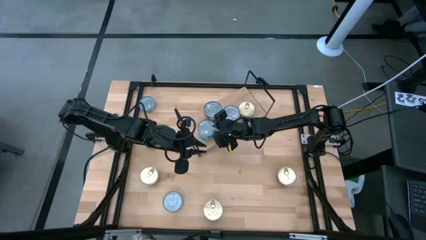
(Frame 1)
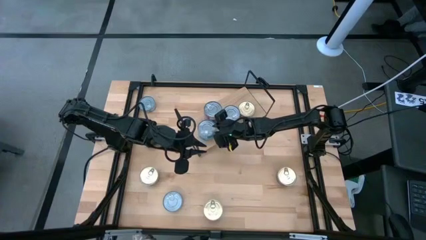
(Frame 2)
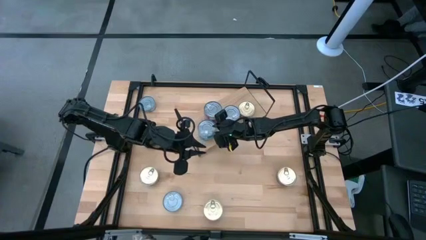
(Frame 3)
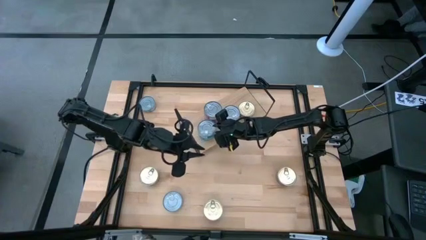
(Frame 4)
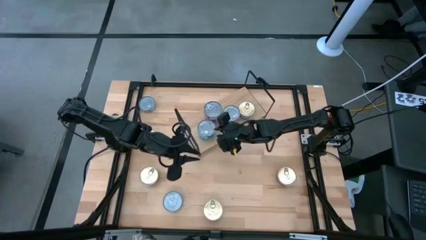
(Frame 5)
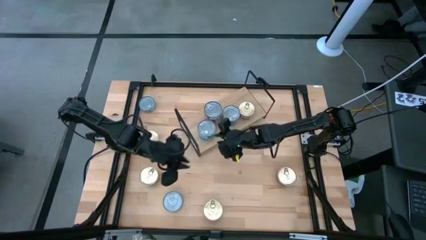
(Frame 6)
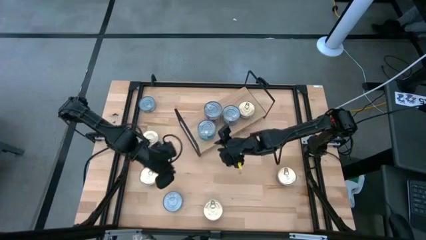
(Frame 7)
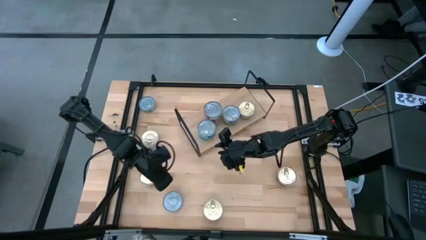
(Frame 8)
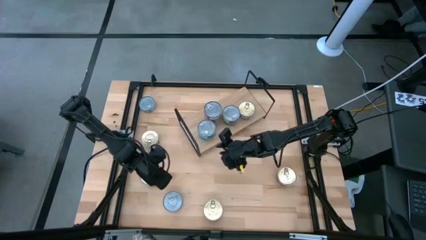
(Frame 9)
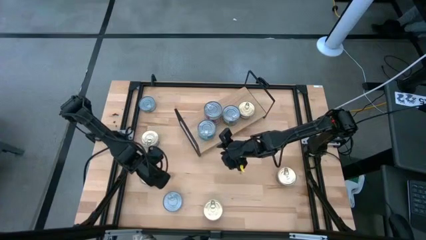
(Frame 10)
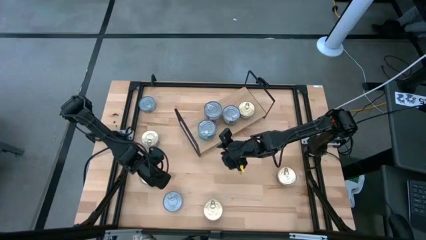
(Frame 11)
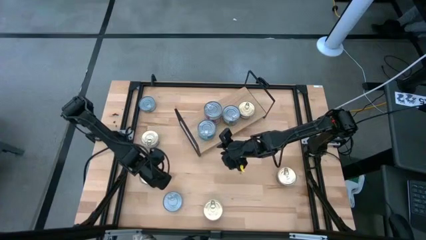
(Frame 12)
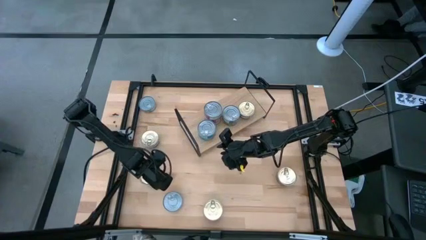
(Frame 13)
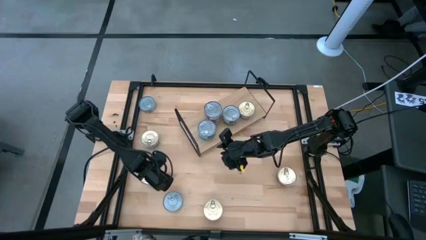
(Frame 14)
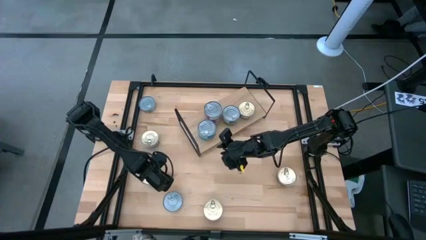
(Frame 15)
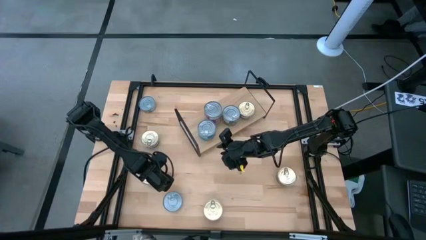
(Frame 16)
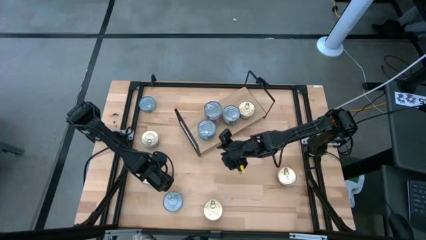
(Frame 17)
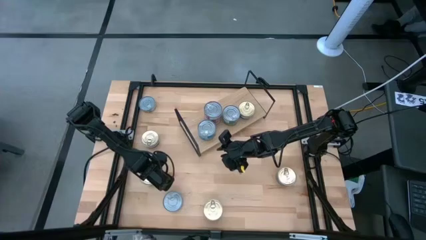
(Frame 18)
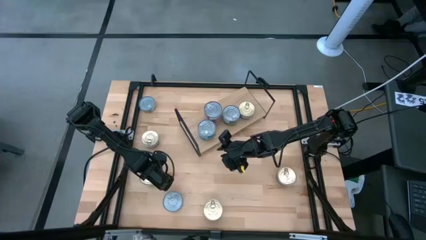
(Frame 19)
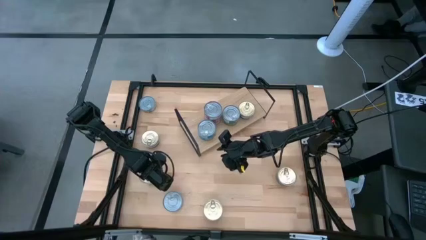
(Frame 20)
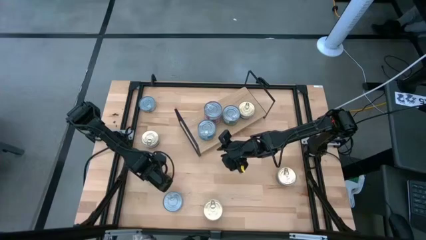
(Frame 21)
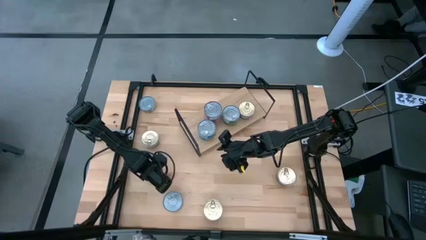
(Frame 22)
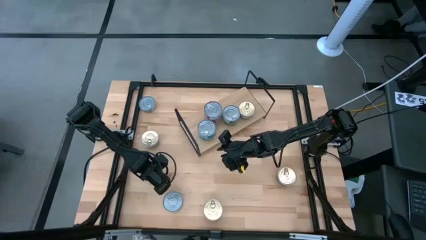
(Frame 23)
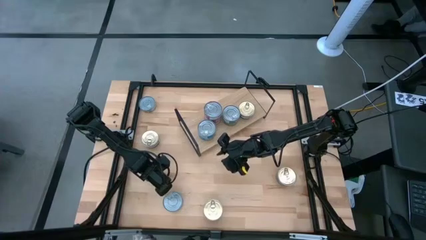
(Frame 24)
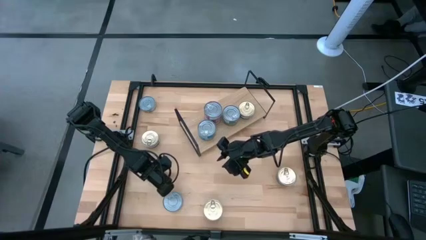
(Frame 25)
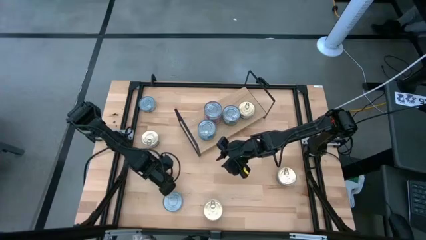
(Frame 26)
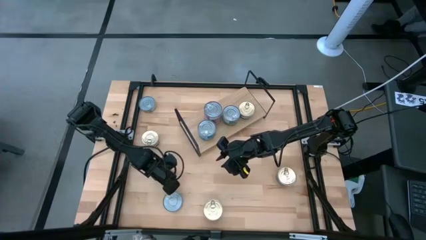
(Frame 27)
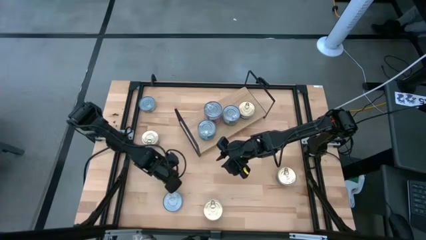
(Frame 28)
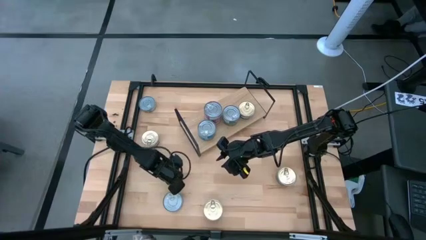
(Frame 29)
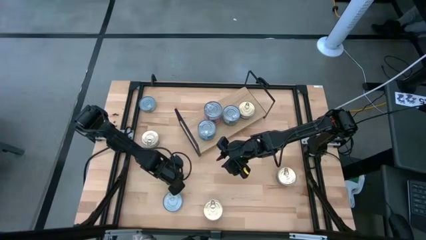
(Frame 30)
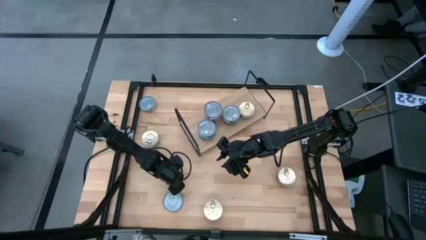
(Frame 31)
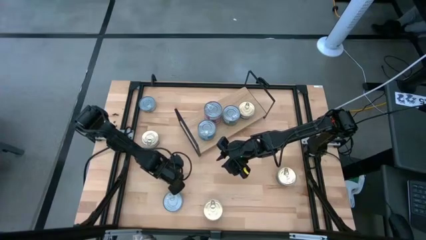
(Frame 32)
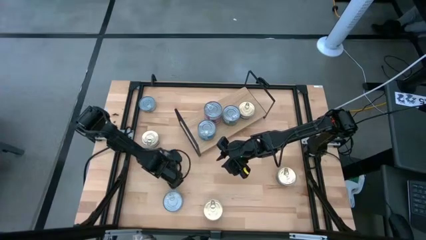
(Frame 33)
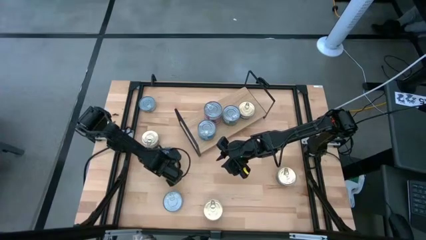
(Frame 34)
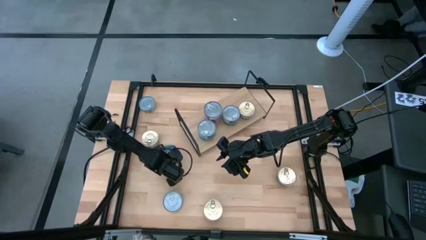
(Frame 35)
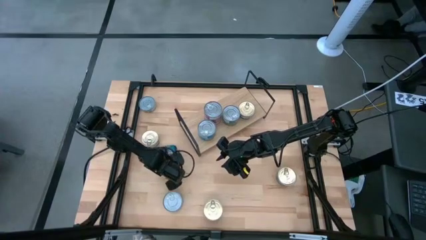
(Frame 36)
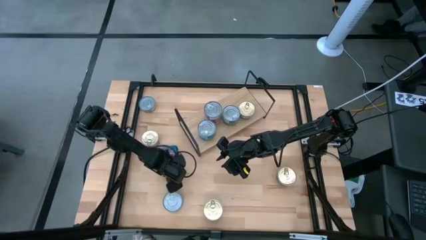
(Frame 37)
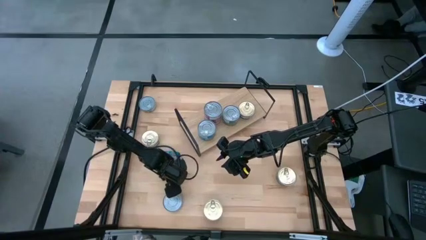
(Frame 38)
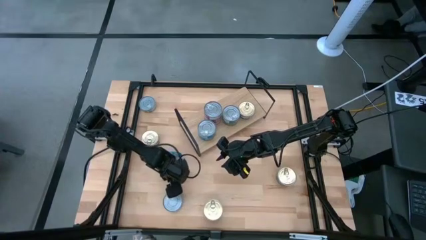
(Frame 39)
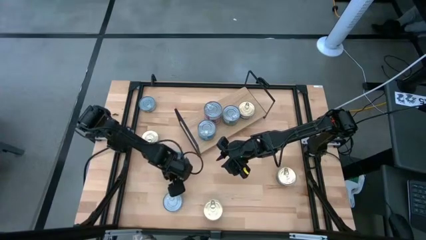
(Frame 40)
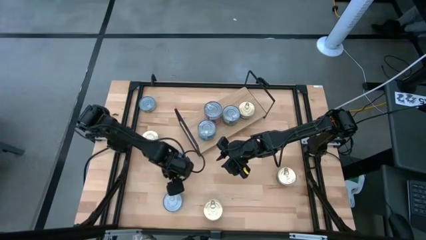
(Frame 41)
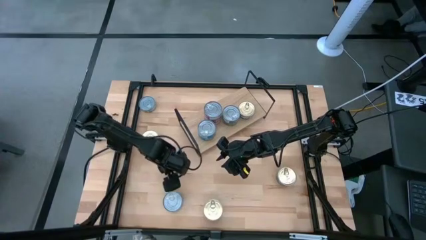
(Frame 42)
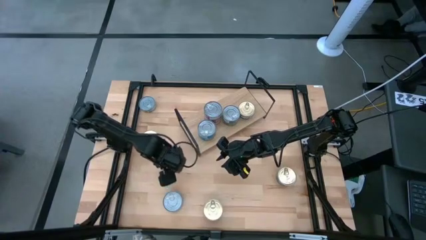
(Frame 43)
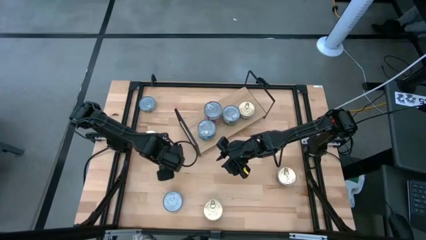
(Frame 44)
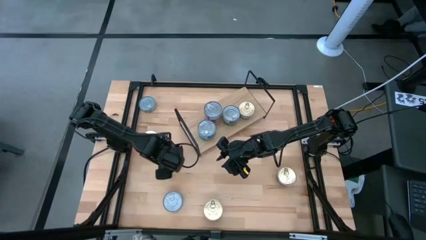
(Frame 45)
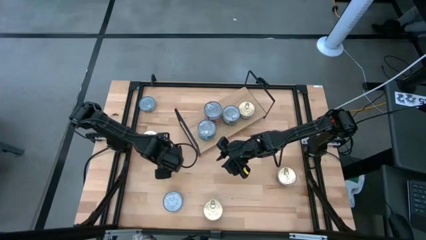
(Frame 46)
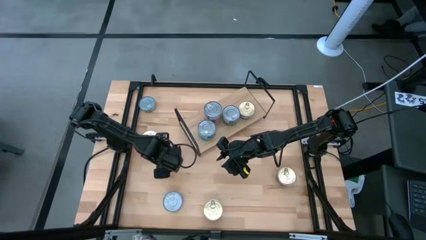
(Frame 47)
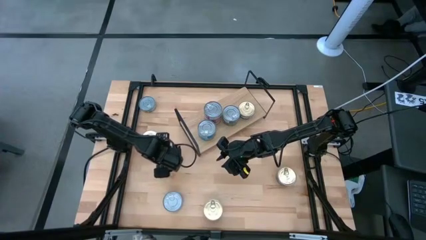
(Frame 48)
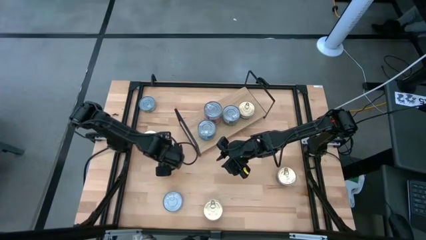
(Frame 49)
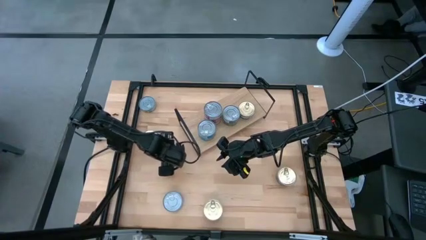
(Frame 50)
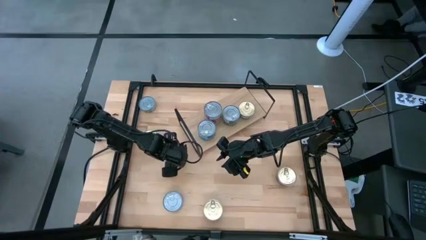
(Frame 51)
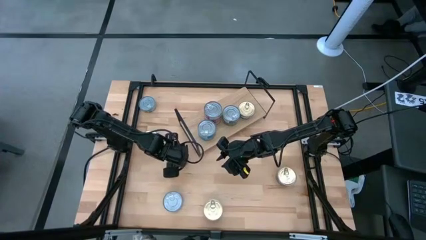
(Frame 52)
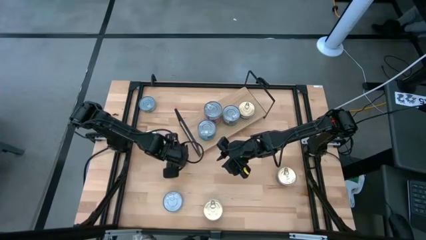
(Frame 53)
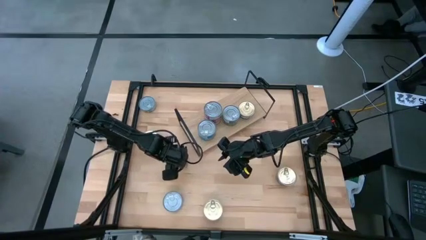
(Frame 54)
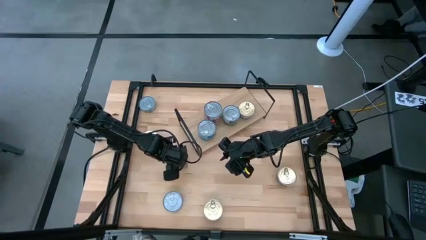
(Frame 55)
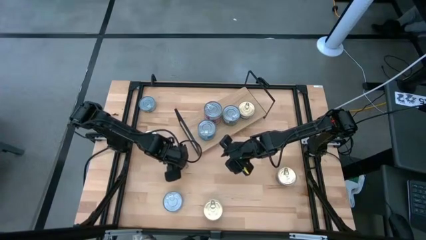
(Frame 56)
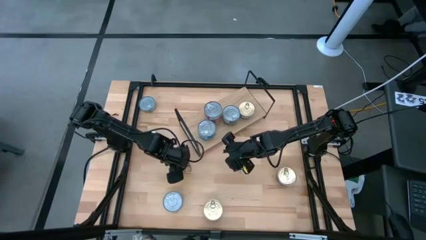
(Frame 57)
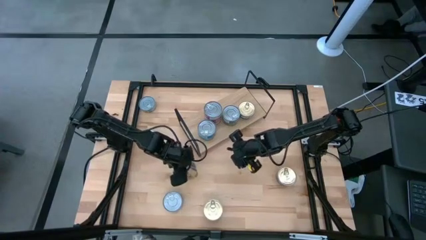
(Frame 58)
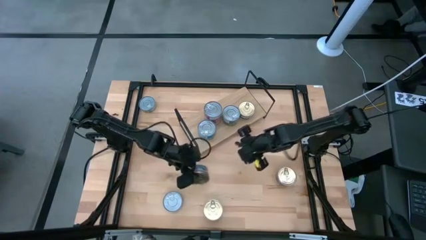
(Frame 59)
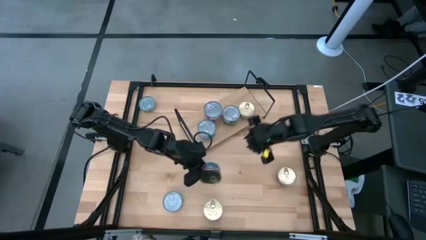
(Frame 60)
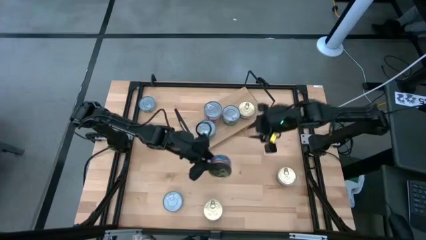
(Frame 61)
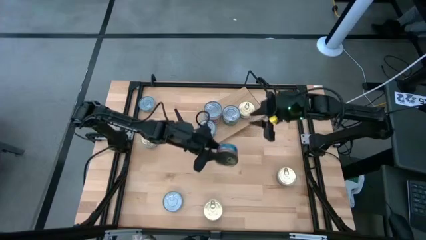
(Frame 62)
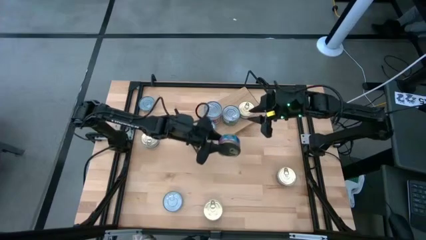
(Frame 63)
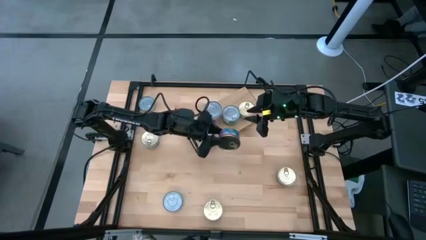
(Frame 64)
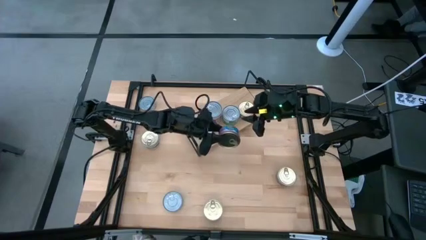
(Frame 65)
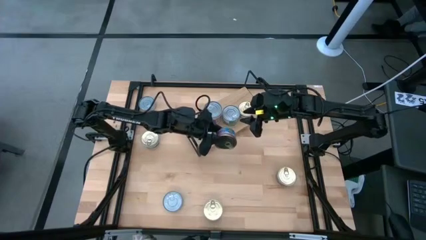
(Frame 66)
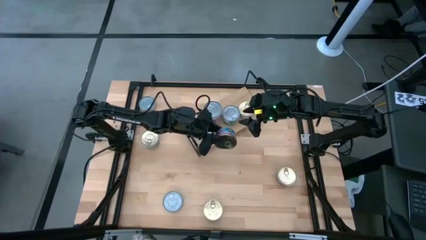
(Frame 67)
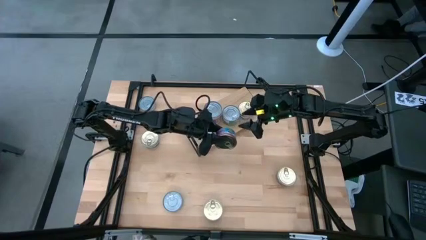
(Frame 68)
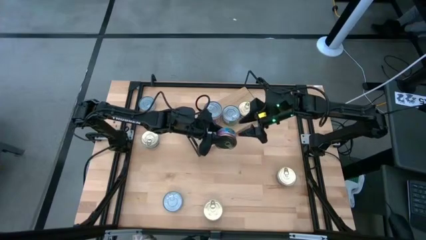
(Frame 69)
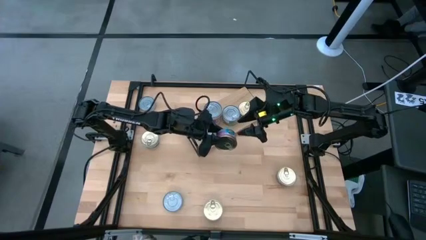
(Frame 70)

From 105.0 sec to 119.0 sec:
Task: Stack canned seafood by type on shelf
Stack the blue and pink tuna can on the shelf on top of the other blue and pink tuna can

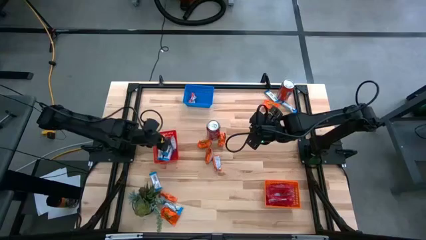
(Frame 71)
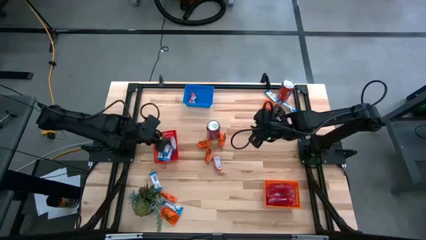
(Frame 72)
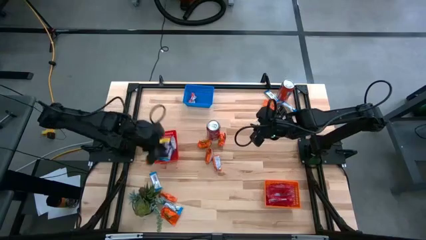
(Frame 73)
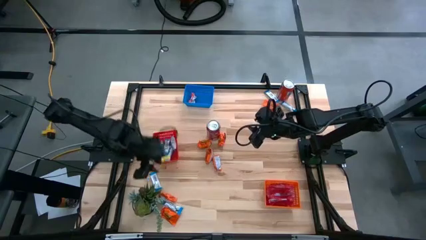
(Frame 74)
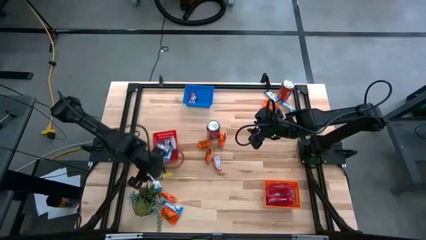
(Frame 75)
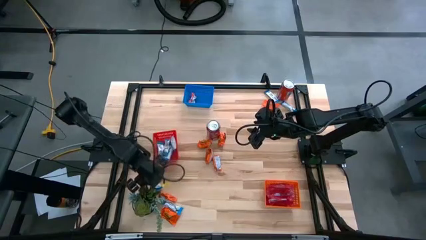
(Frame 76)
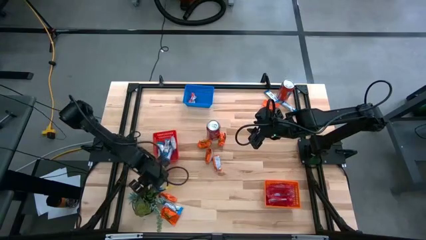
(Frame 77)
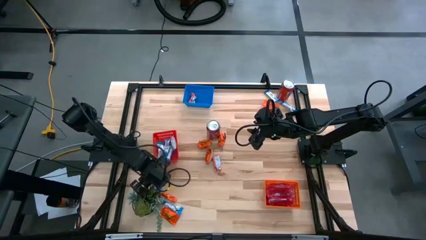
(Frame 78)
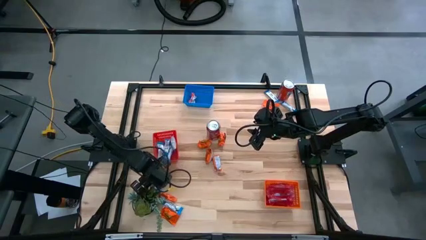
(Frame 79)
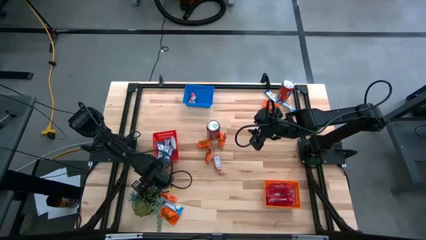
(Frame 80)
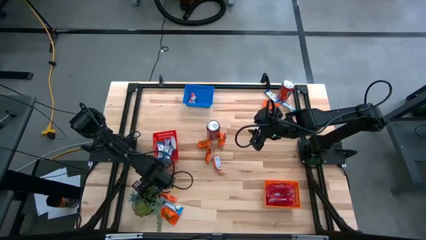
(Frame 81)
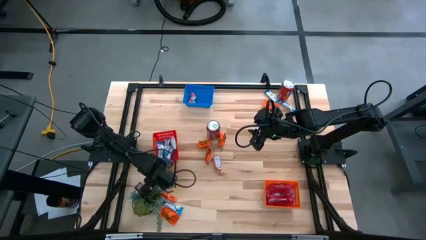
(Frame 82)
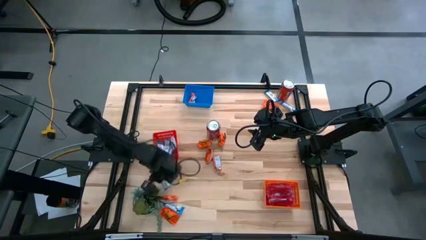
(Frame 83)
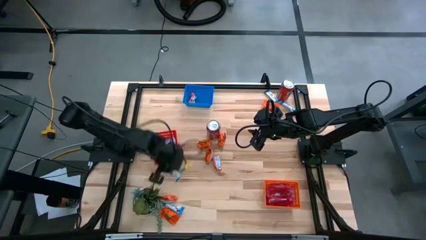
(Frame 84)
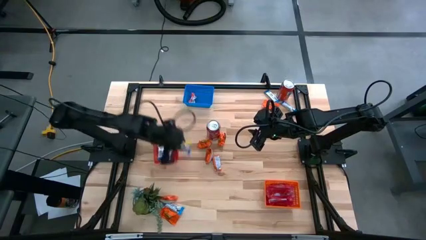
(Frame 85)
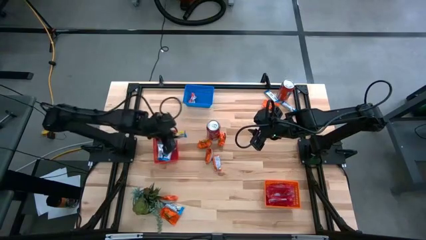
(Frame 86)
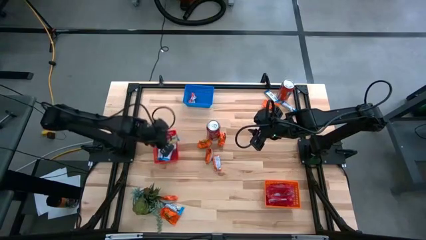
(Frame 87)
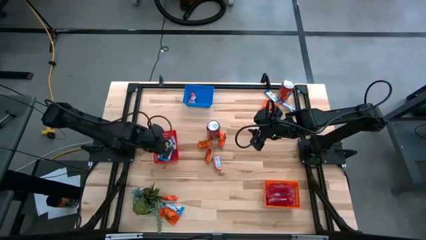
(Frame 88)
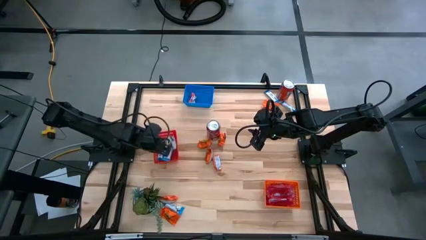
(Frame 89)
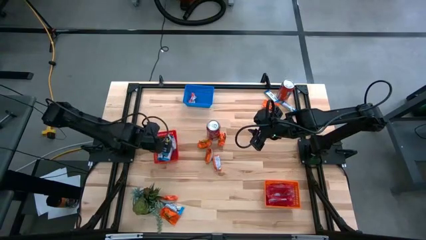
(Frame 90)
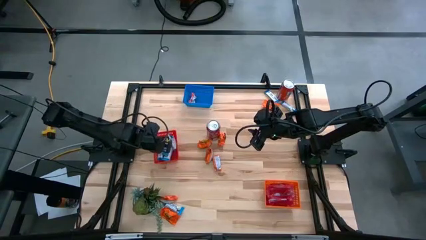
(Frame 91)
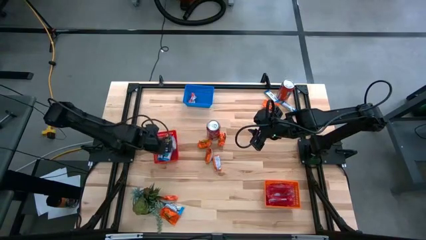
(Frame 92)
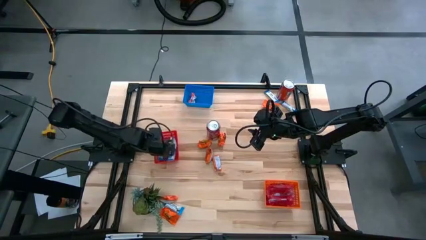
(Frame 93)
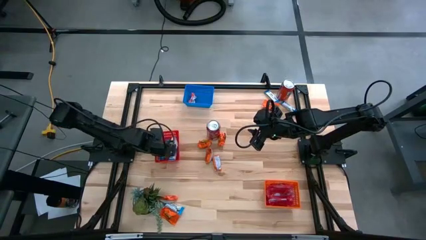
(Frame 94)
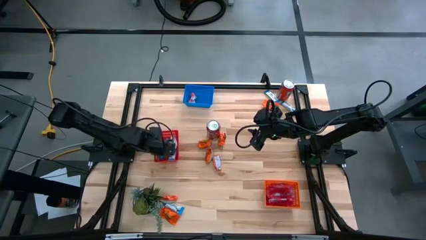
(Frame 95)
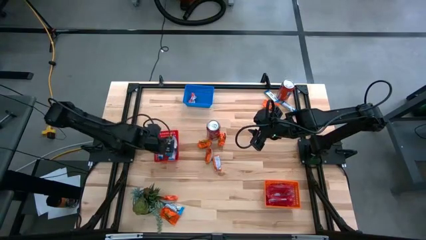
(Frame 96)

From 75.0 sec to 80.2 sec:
Task: Sort candy
Put the white chocolate into the red bin
